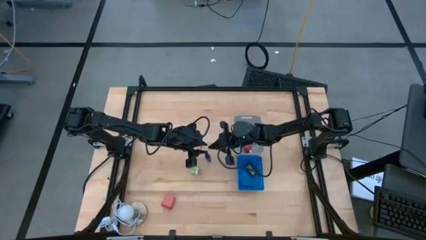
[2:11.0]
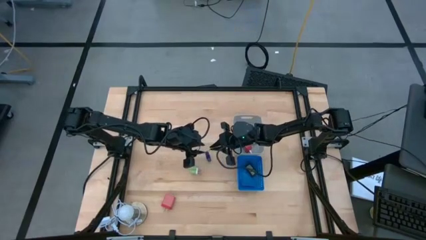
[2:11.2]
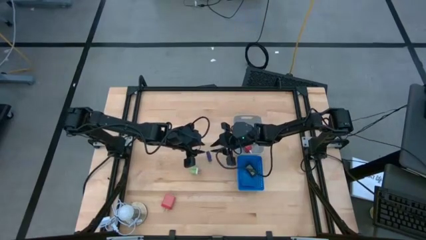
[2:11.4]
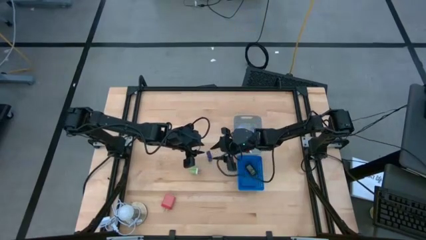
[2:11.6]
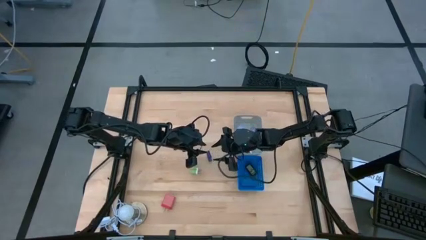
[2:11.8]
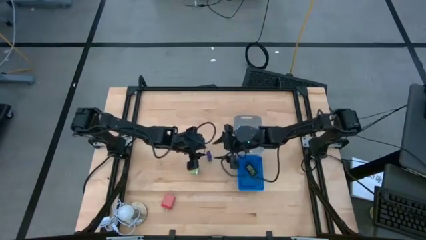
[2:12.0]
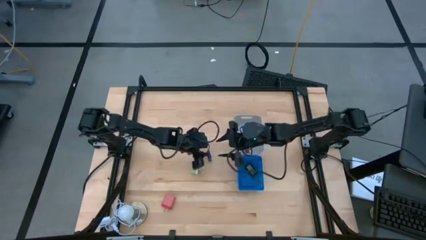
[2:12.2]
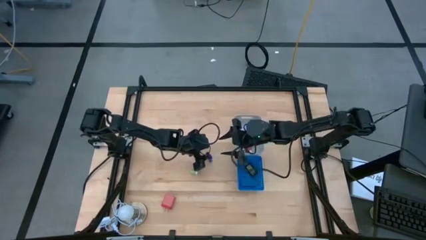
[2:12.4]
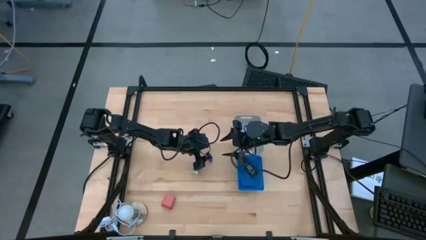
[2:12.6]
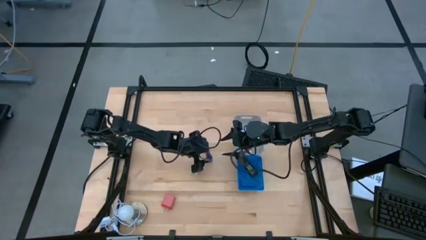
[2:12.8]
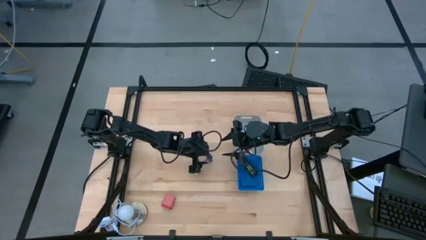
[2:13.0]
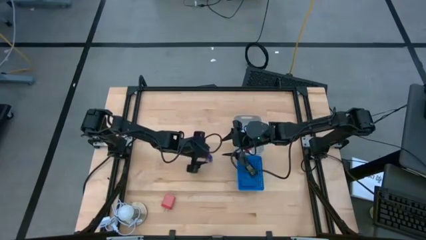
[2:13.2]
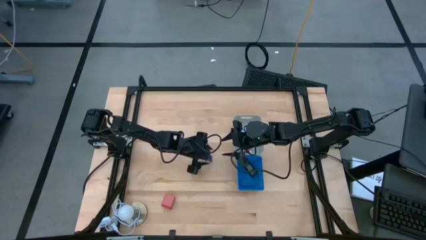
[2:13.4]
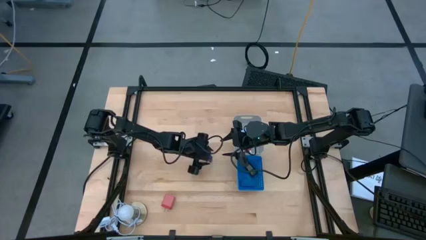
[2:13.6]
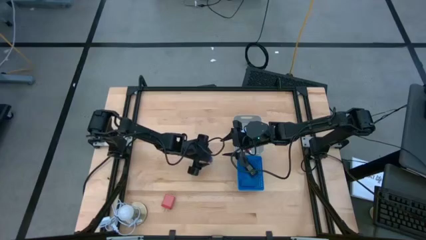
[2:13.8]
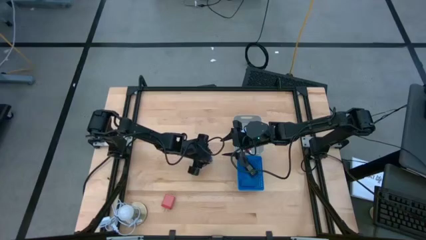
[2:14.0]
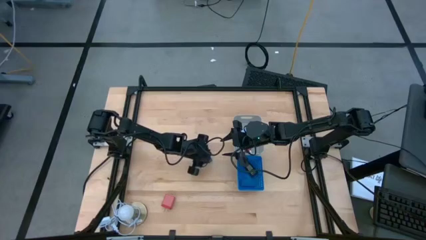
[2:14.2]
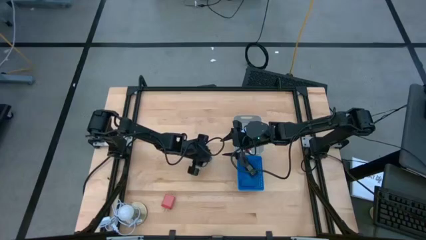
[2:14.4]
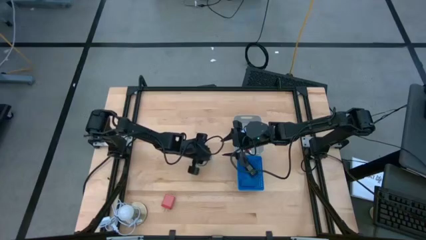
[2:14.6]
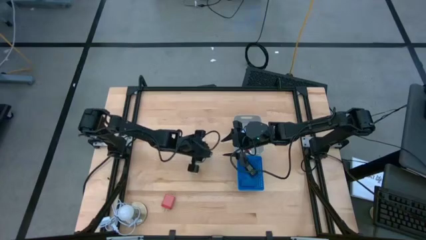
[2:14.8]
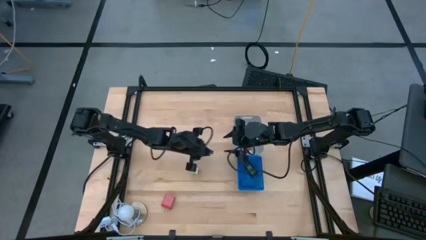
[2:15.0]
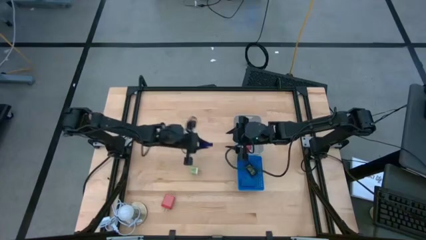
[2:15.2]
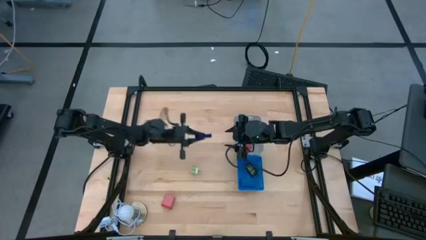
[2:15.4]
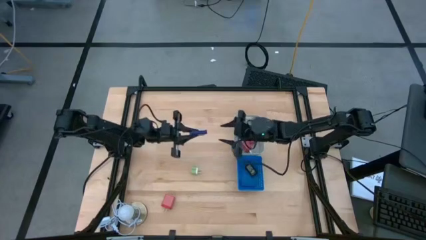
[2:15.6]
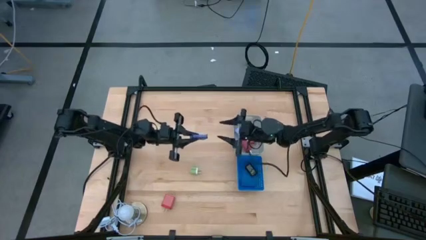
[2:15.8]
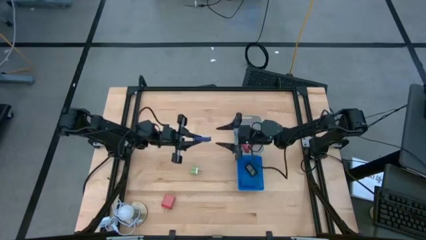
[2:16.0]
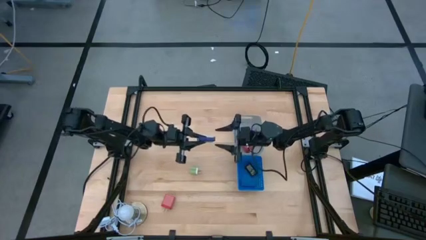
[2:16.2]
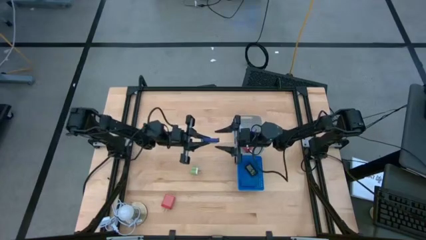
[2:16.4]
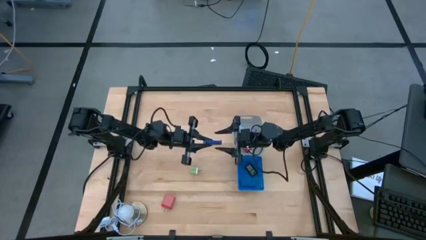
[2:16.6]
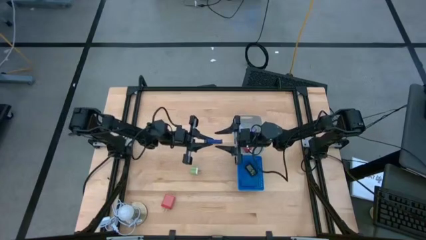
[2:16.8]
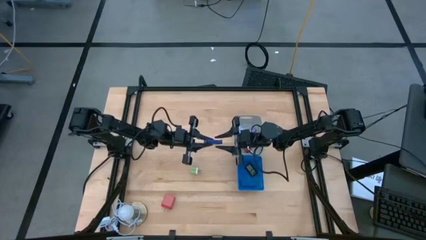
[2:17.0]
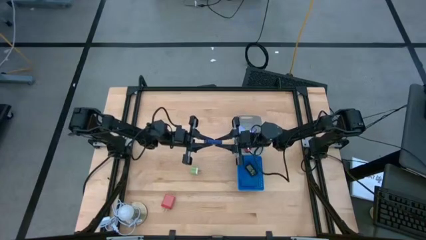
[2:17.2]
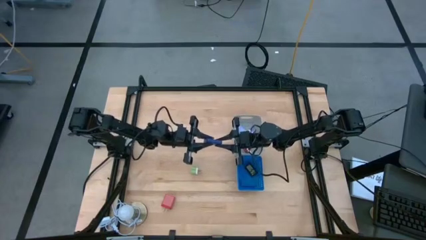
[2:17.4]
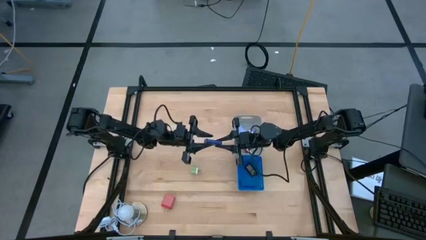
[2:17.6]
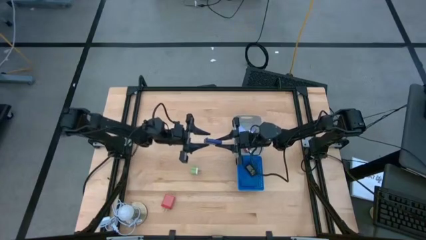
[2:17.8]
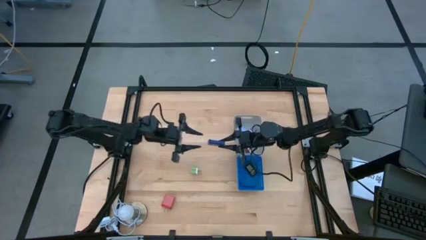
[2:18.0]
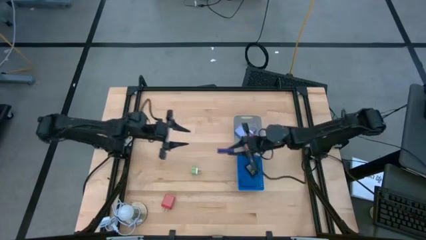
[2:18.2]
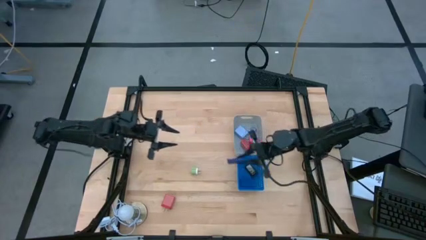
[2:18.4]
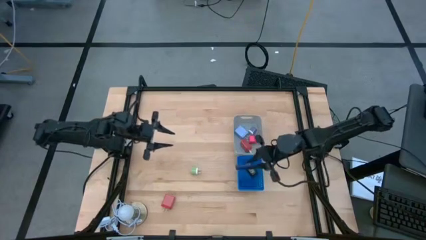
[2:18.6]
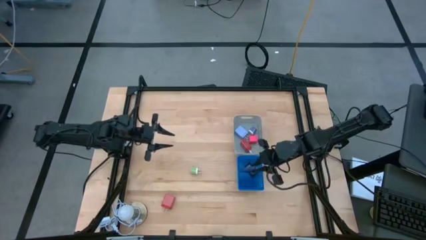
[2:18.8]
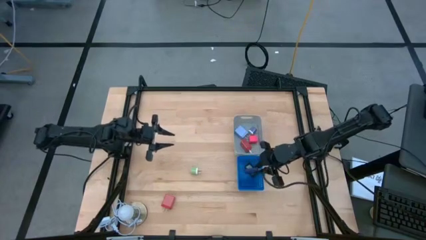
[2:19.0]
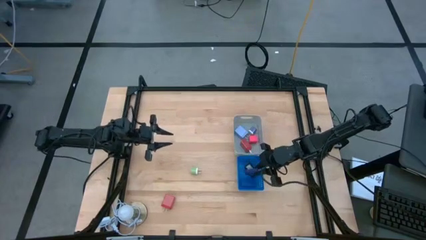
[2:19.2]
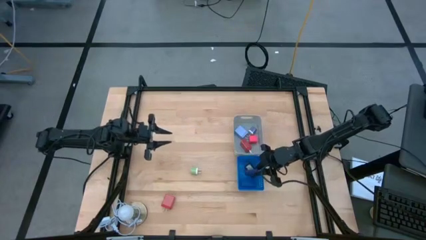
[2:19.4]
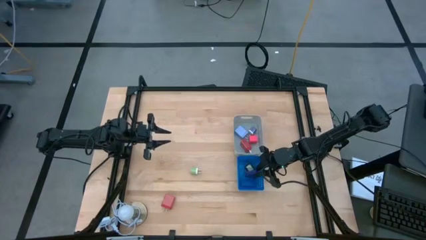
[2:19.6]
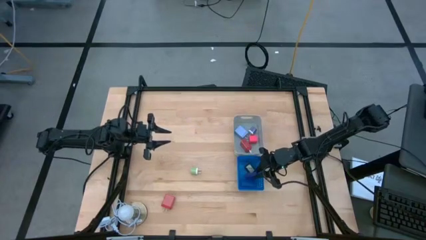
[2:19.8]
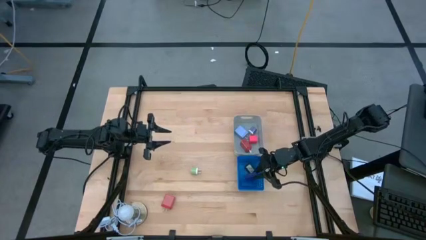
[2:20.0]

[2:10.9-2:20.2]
Task: Pick & Place Office items
Put the blue digital clock into the blue bin

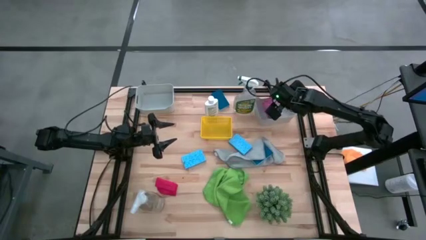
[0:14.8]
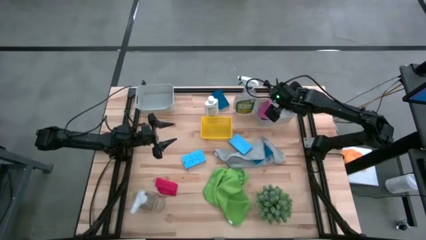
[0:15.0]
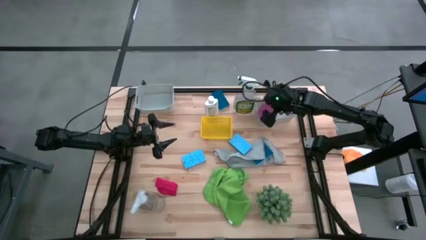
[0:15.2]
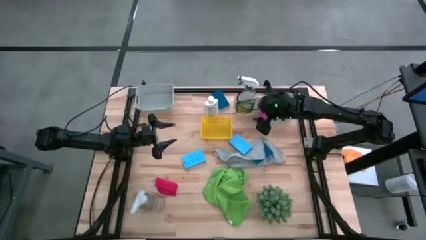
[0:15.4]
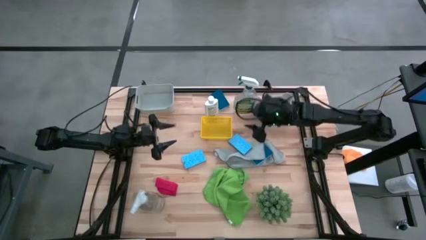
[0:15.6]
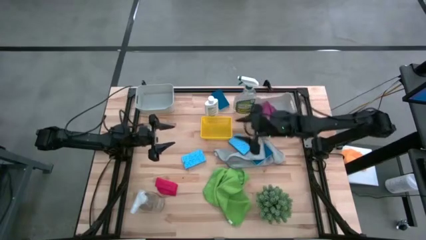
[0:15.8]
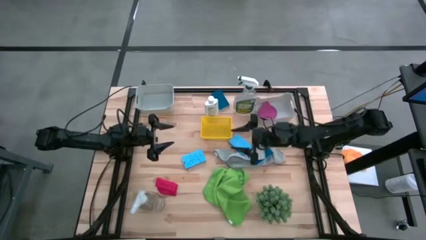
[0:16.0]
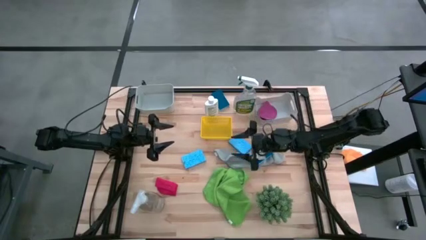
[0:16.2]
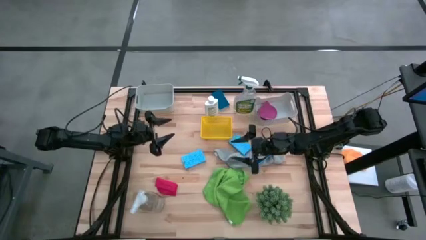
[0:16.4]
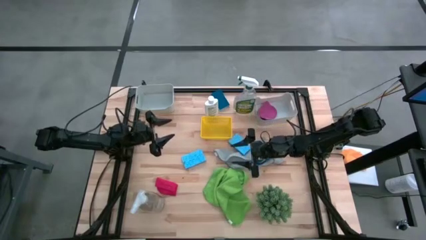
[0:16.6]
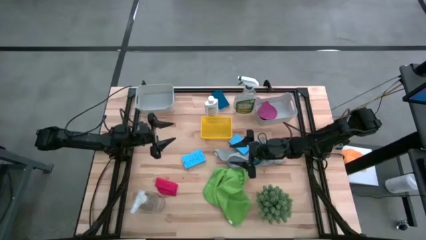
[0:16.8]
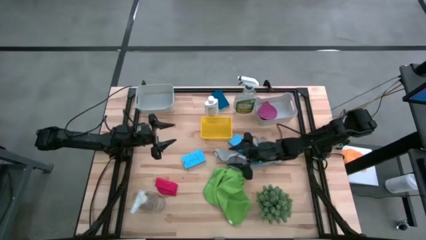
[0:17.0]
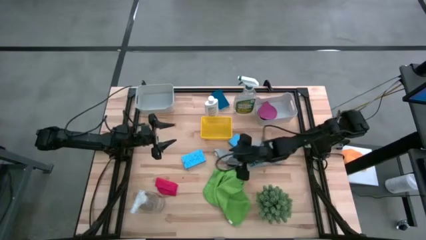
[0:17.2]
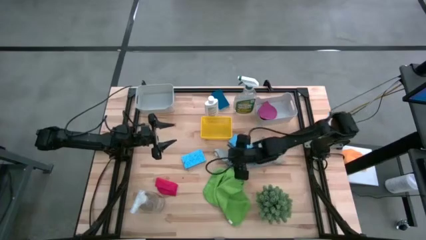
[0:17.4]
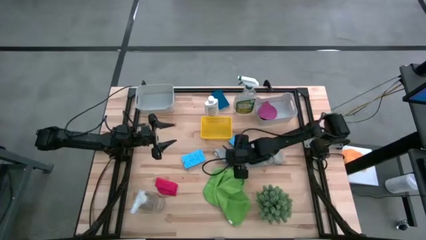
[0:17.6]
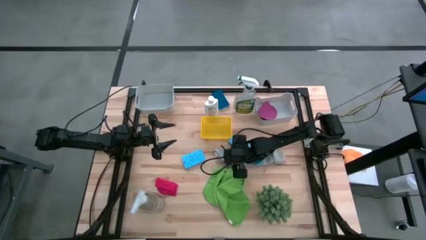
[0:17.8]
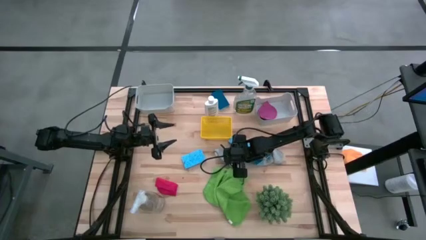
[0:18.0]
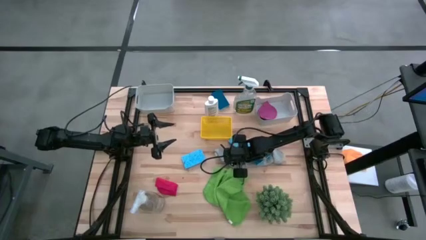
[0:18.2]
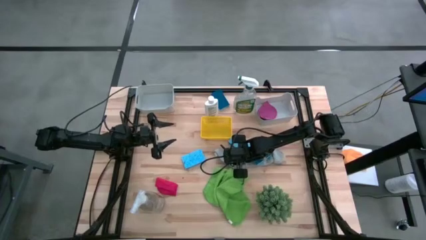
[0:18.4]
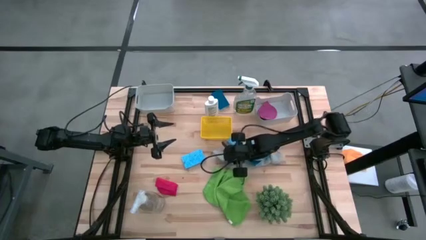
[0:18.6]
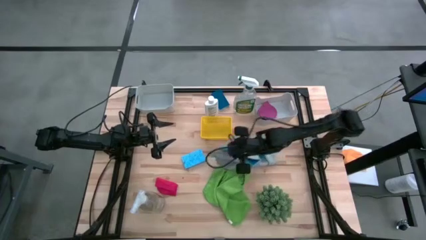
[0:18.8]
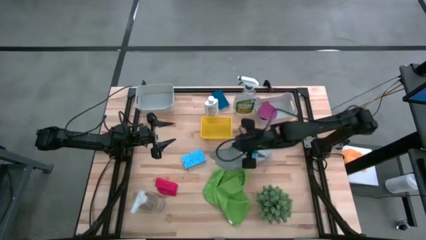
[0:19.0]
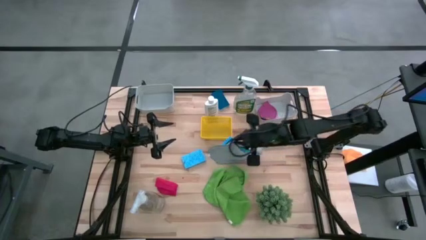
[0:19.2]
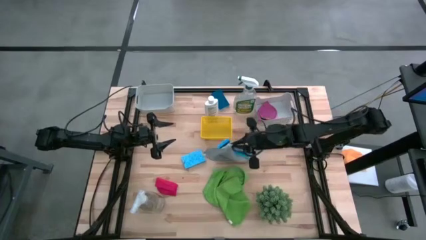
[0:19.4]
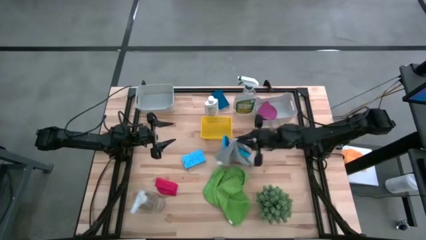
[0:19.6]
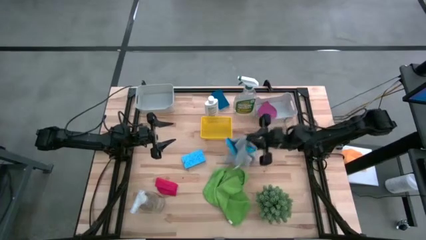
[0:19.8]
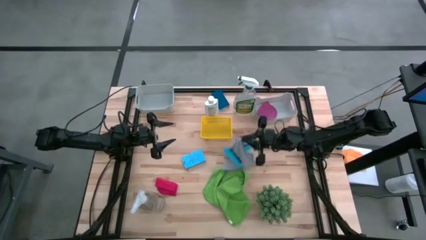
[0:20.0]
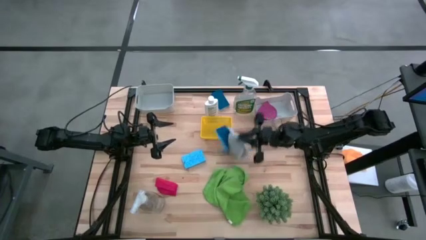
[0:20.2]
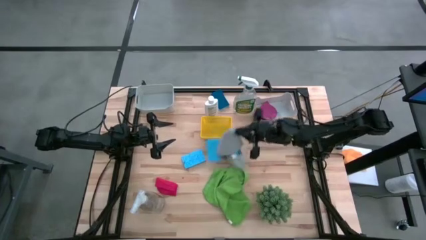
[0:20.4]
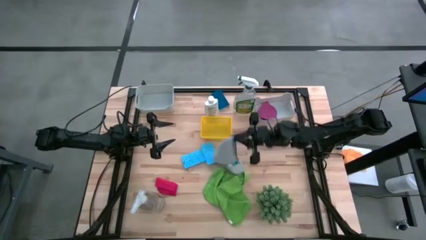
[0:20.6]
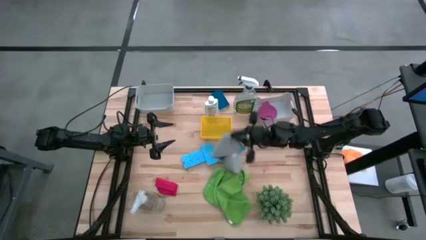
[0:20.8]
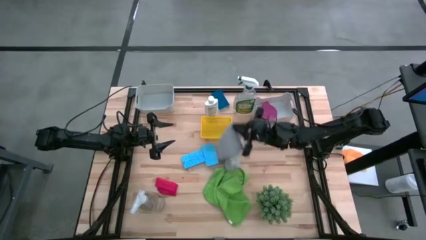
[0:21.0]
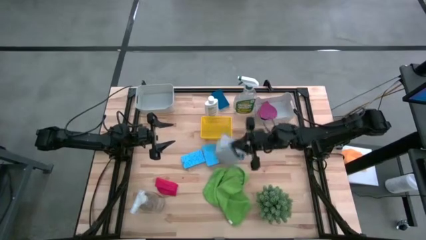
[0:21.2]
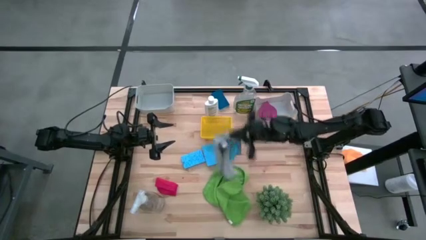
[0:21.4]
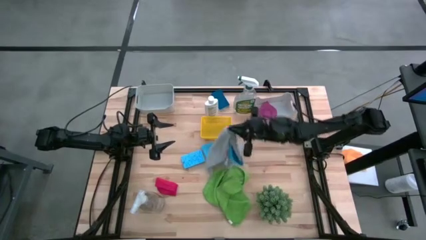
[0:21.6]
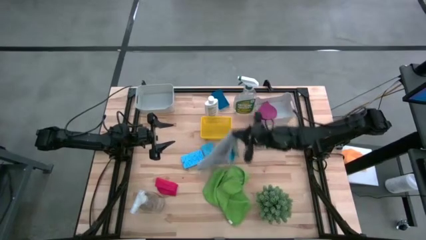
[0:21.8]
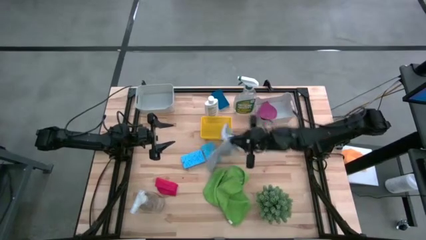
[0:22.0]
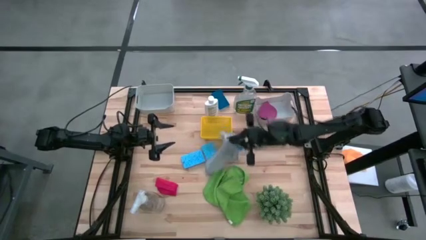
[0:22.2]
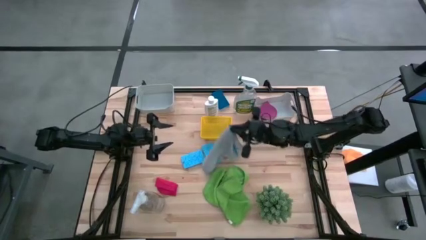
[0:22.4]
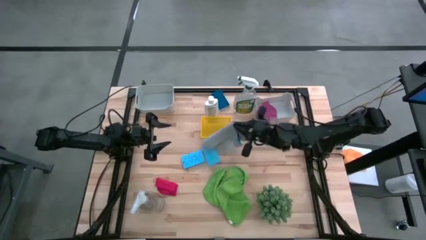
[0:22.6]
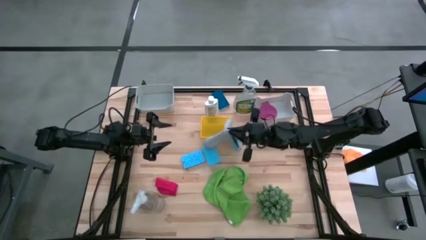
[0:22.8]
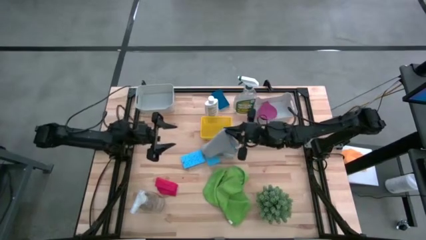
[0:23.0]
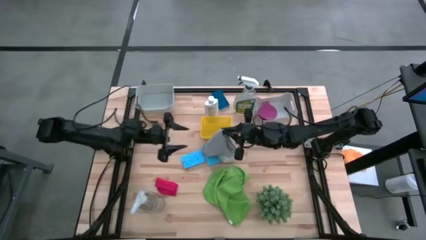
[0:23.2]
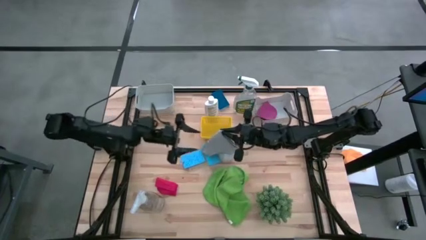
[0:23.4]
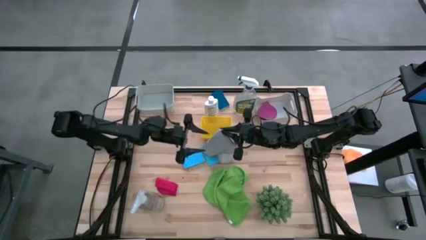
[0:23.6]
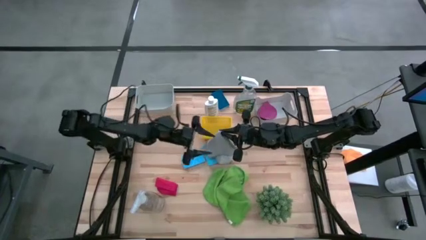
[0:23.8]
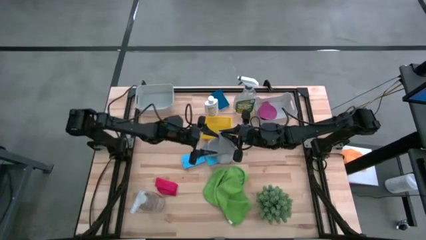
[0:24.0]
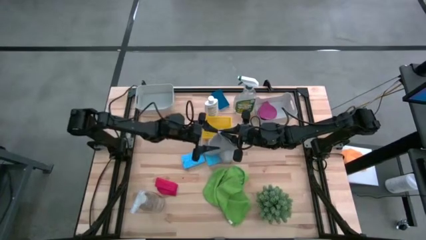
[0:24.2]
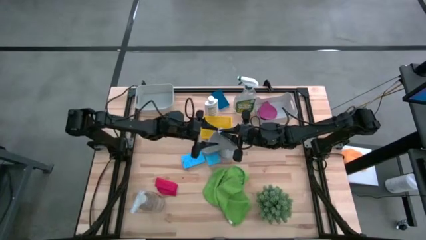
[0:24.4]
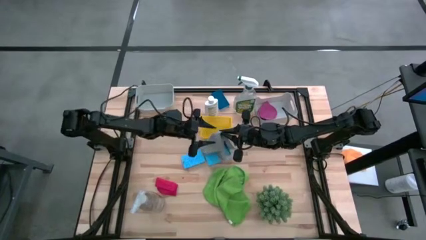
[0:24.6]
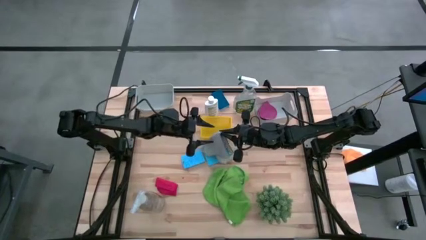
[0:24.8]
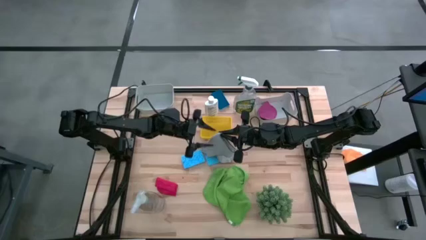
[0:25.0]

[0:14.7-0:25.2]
Task: Pick & Place Kitchen Items
Put the gray microfiber towel into the right gray bin
